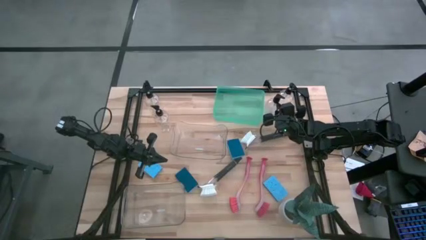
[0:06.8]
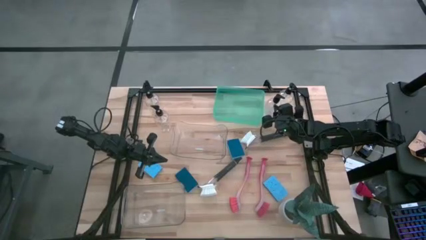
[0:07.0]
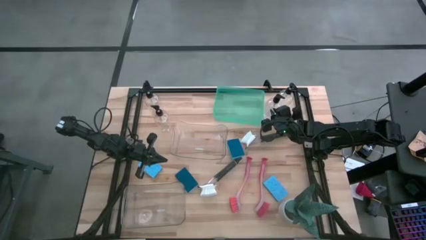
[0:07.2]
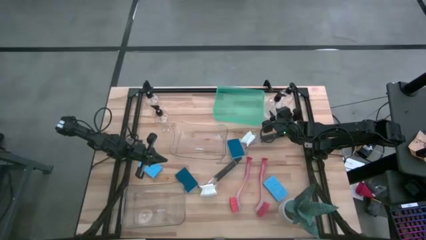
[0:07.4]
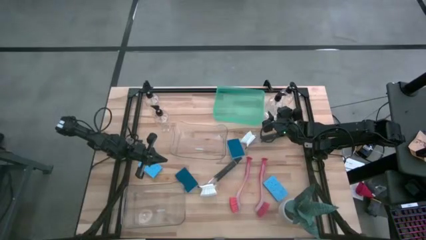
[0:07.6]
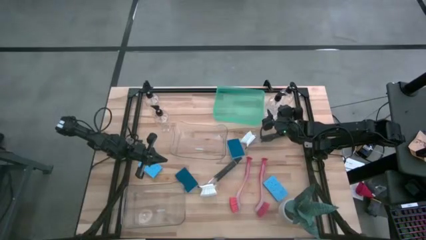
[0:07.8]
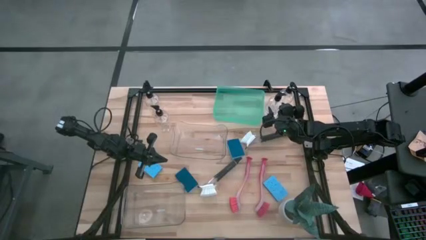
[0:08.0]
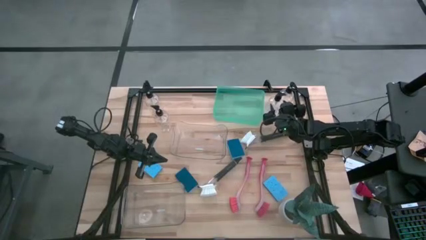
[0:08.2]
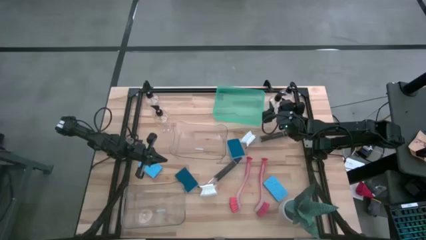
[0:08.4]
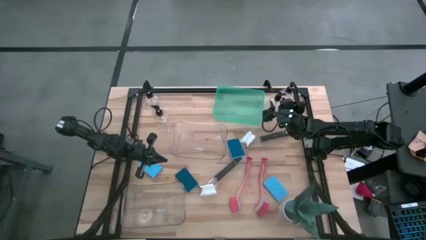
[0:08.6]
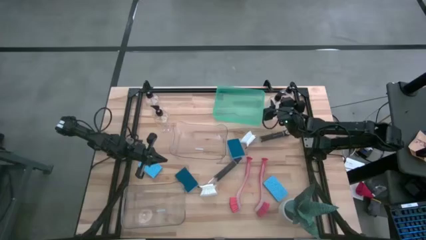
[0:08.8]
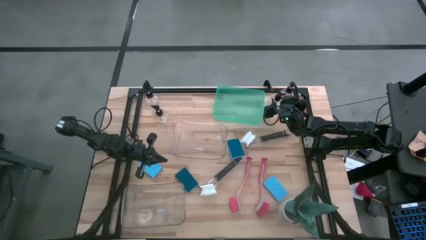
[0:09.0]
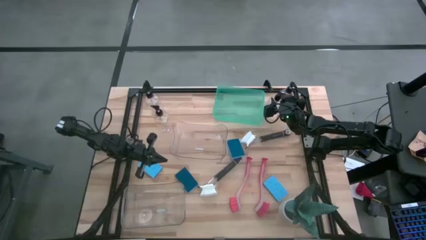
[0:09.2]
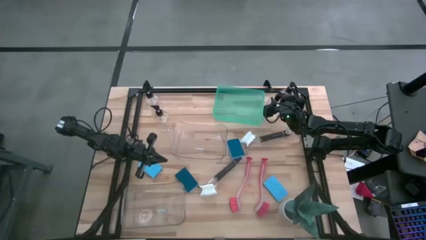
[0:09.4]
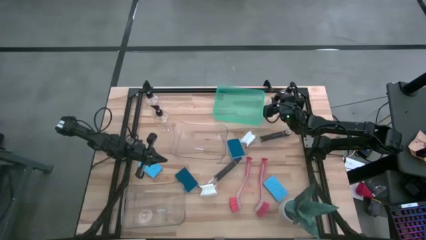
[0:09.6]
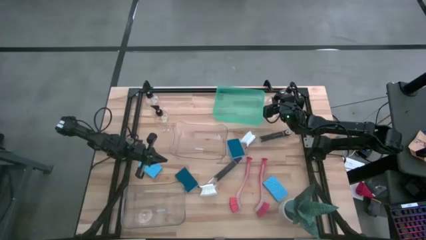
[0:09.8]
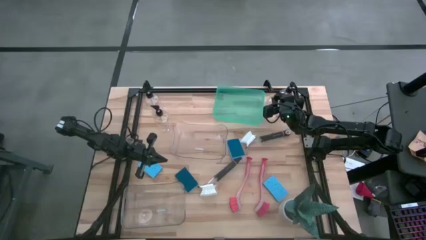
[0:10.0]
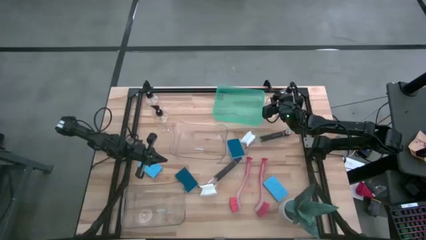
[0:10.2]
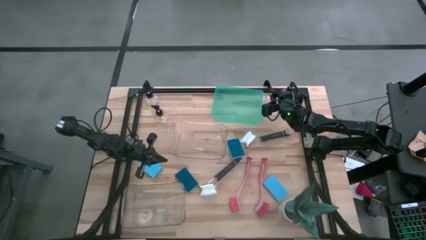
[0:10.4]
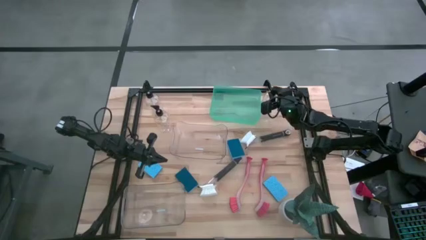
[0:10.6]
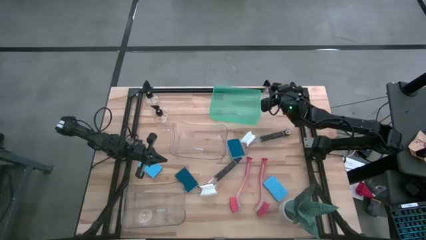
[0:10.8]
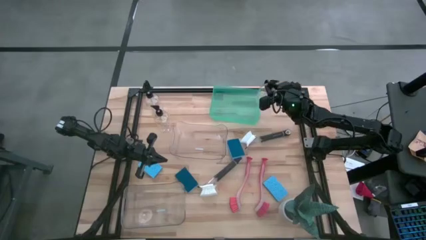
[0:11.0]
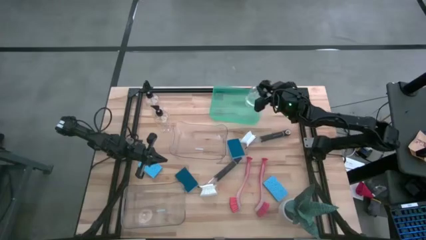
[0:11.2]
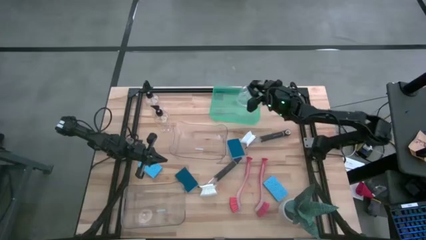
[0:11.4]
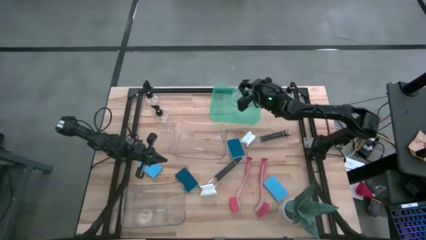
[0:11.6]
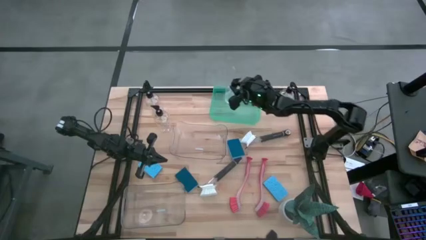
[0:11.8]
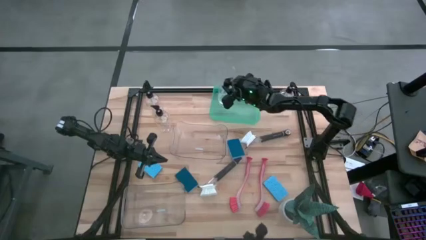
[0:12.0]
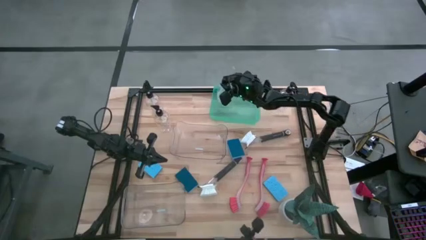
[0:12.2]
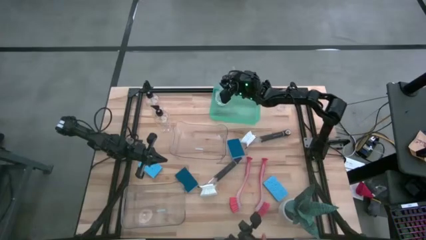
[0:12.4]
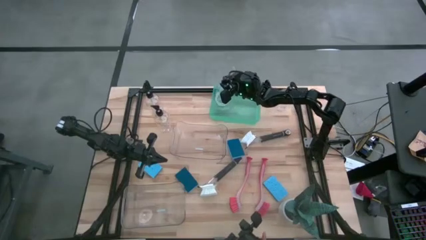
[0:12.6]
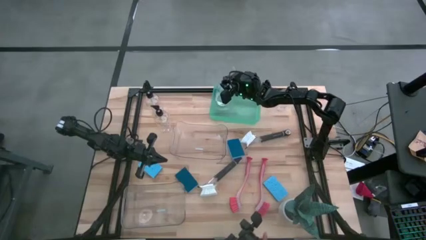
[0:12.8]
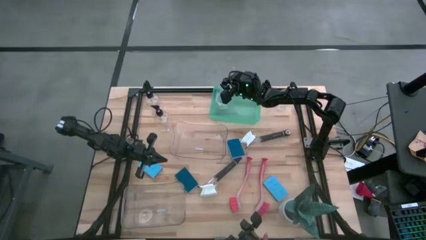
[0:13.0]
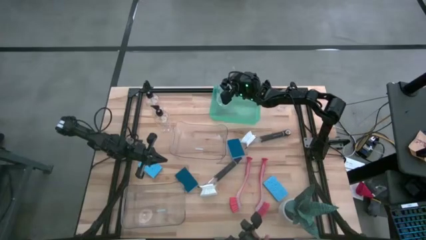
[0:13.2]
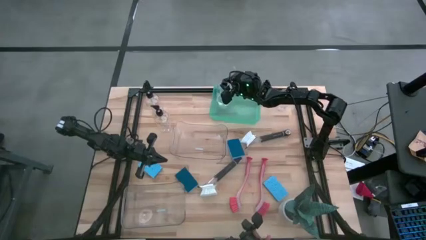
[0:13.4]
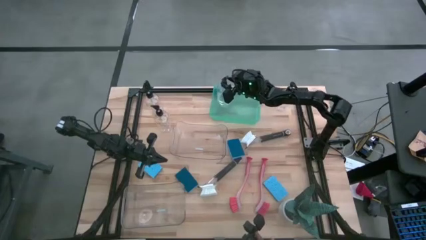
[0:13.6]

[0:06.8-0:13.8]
Task: Pick & Place Kitchen Sink Supplies
Put the transparent soap dispenser into the green bin

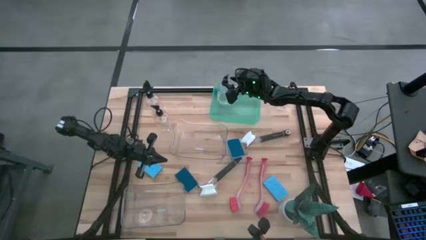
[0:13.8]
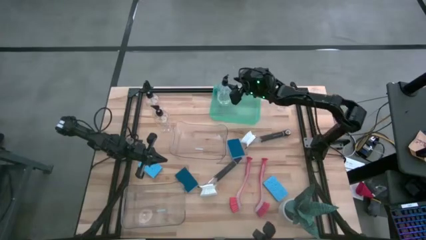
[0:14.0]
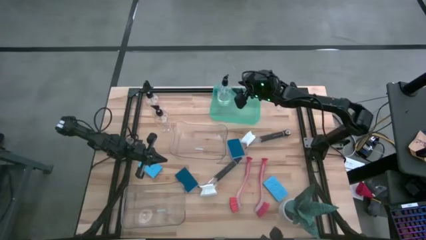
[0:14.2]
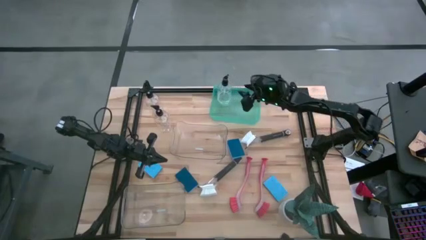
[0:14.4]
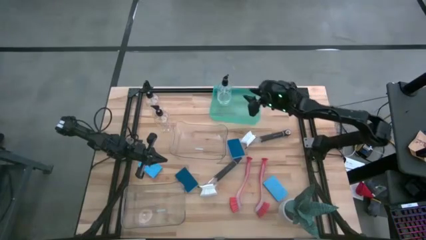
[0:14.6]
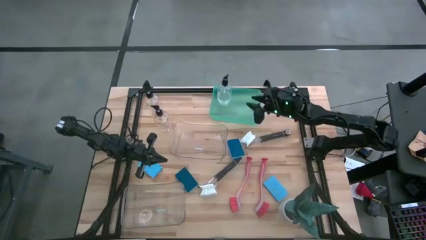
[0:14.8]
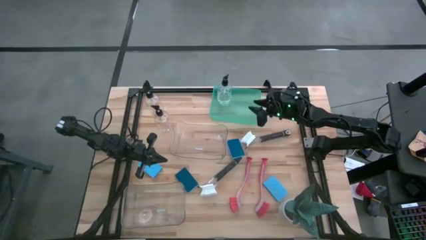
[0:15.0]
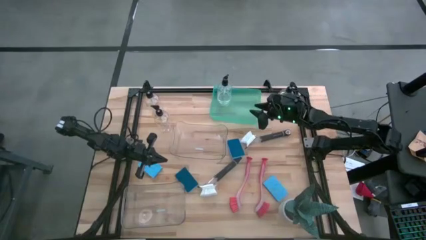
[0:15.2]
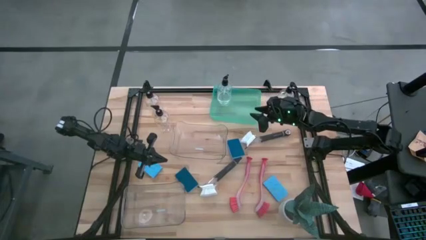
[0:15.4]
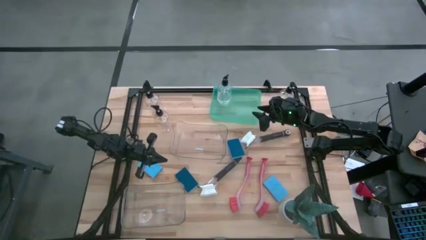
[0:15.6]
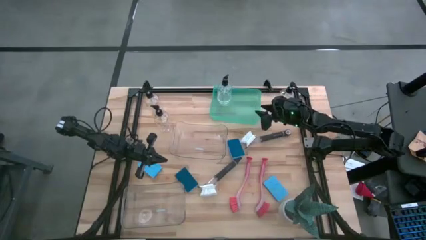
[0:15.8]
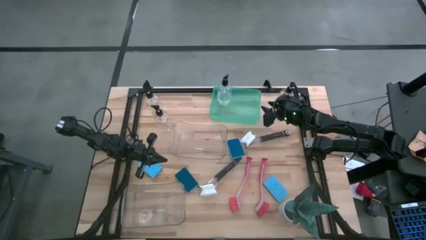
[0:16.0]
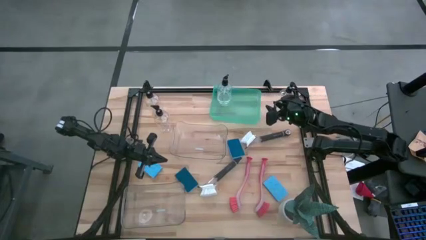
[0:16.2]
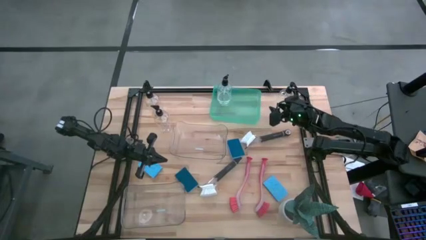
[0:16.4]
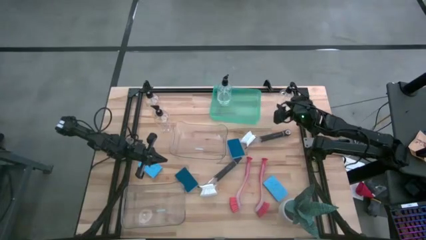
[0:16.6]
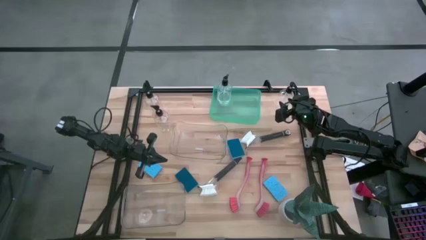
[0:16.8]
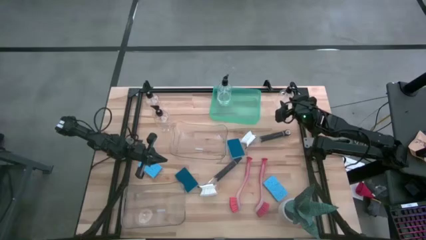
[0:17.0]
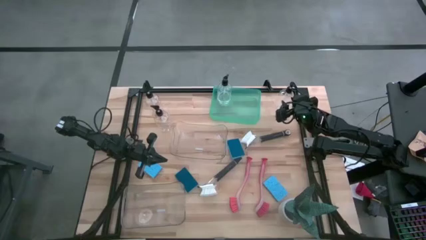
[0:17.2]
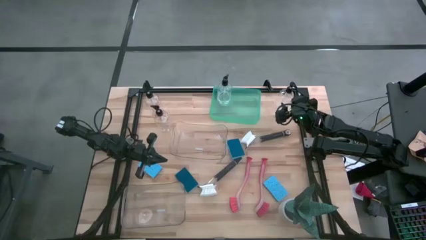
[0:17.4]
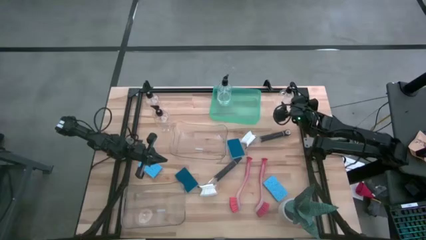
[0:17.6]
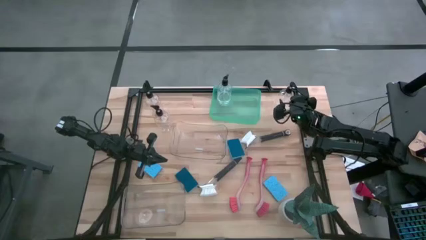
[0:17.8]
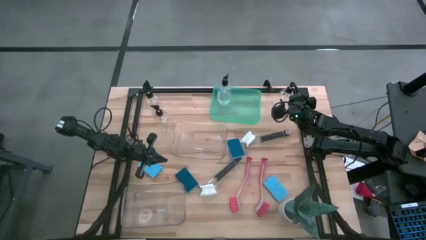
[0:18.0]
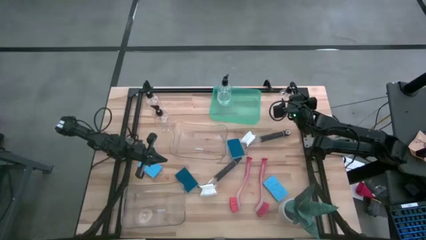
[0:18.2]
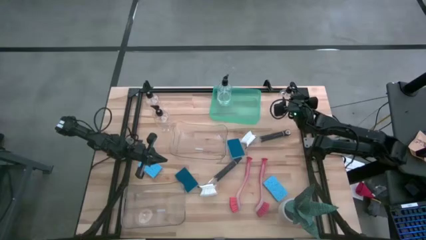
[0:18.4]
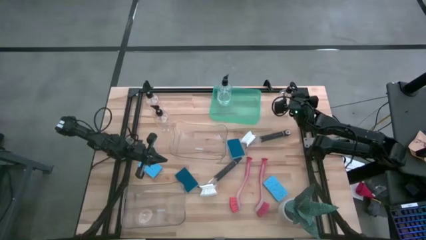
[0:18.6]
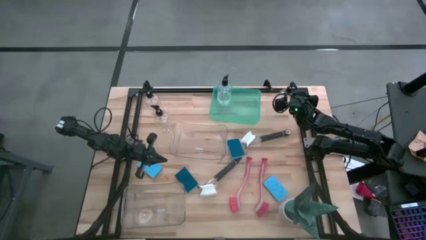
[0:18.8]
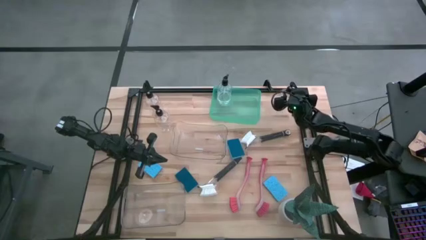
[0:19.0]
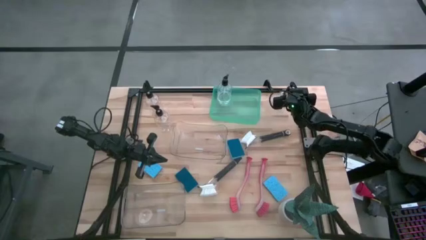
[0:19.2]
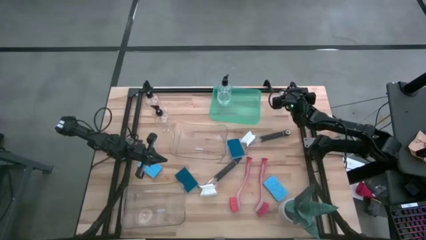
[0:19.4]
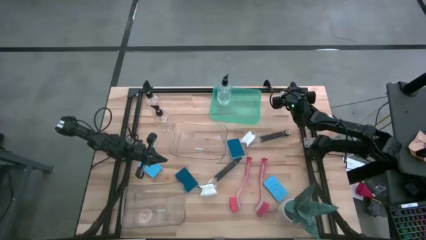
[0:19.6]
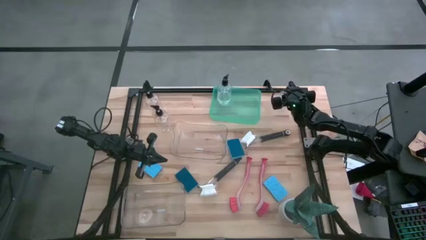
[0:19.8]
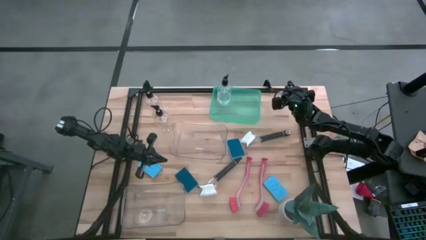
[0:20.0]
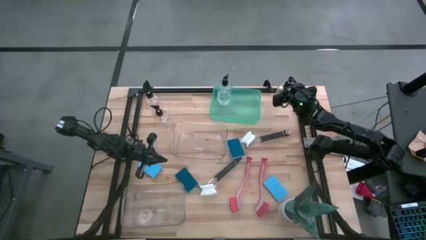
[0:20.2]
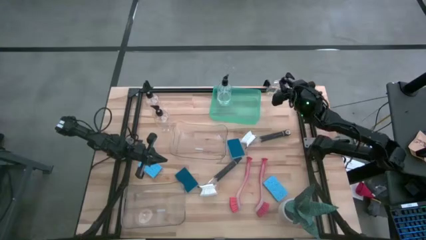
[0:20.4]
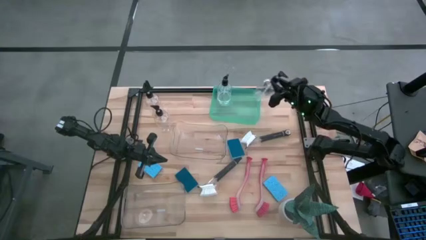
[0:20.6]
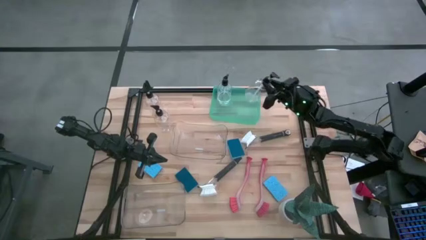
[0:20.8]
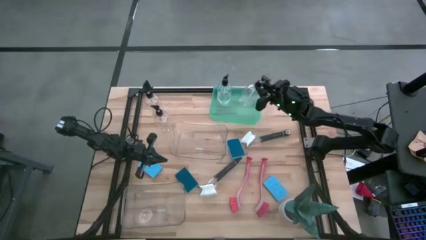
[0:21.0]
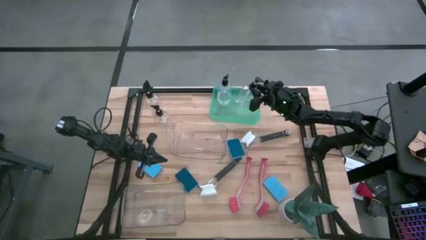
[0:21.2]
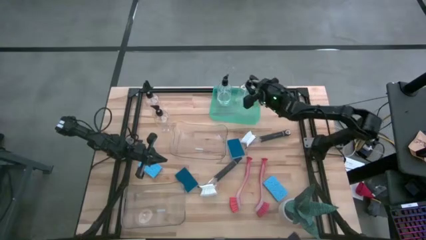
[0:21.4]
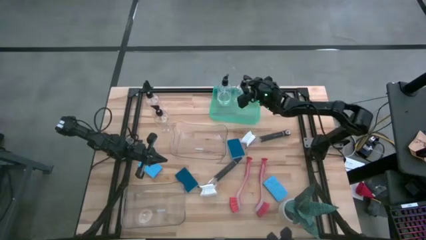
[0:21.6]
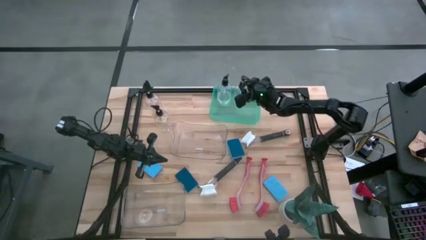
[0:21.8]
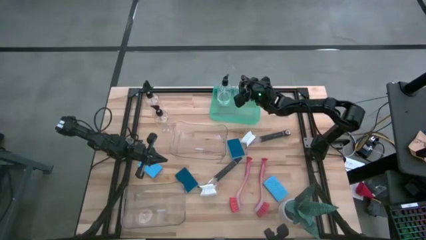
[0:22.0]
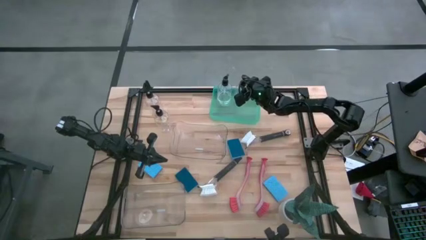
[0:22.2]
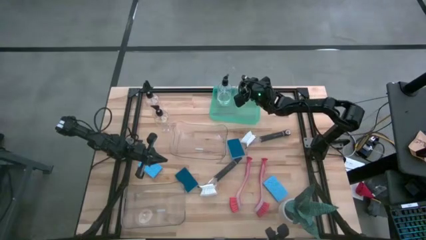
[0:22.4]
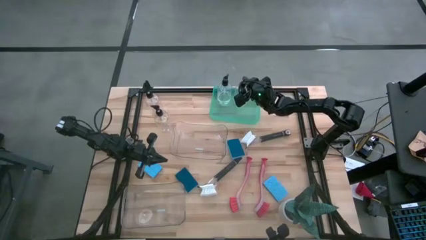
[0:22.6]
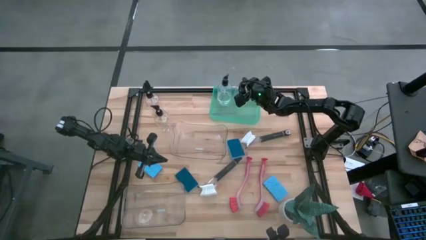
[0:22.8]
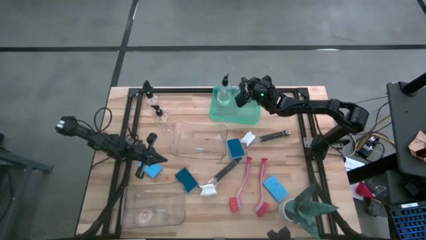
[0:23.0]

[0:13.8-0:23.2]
Put the transparent soap dispenser into the green bin
